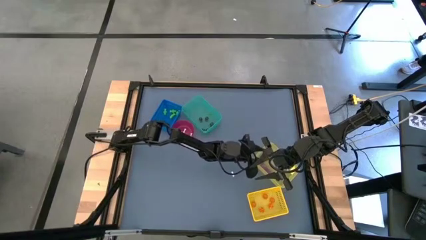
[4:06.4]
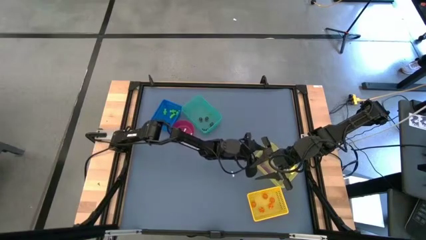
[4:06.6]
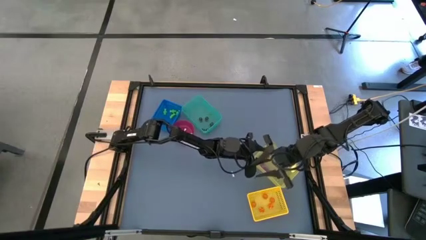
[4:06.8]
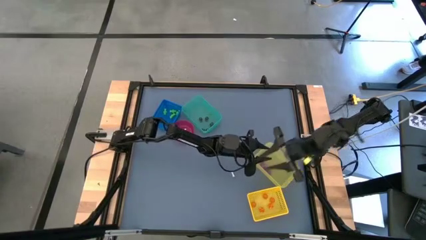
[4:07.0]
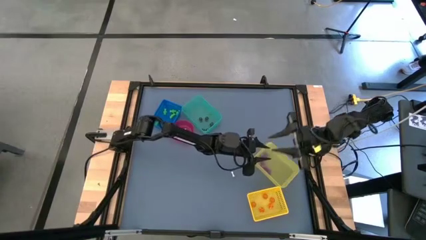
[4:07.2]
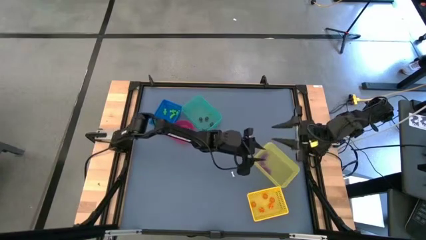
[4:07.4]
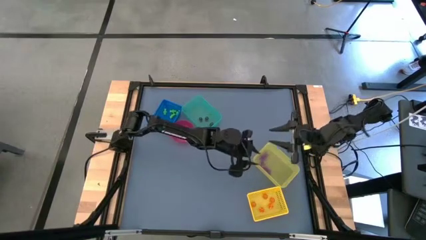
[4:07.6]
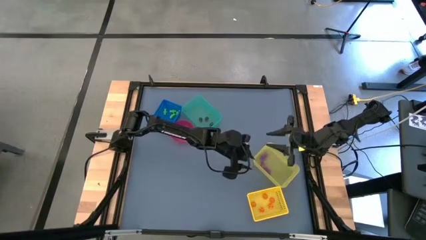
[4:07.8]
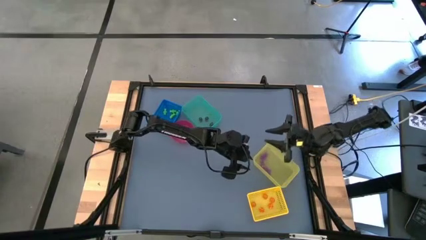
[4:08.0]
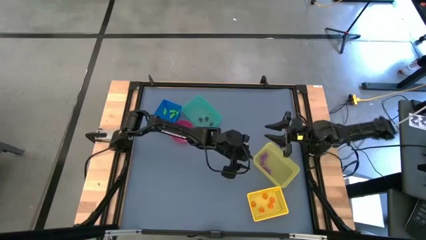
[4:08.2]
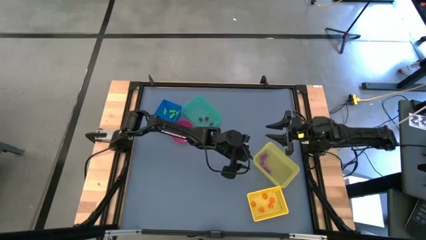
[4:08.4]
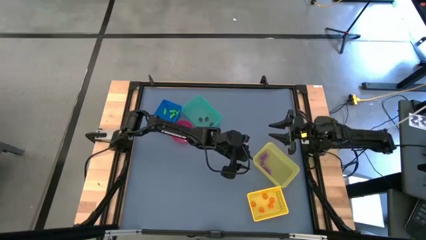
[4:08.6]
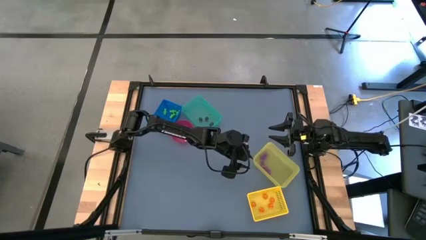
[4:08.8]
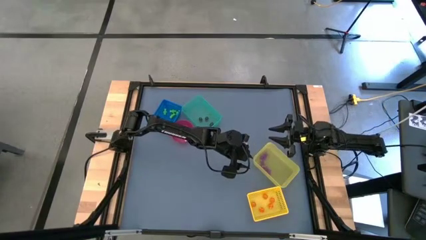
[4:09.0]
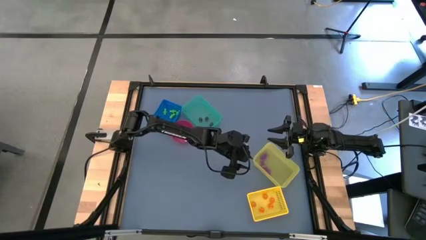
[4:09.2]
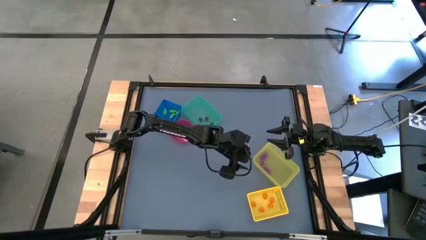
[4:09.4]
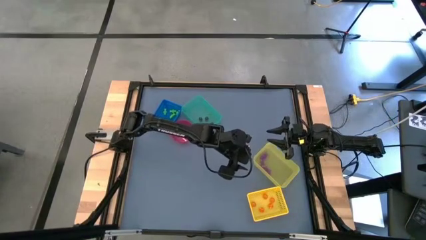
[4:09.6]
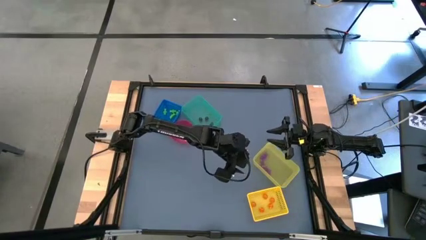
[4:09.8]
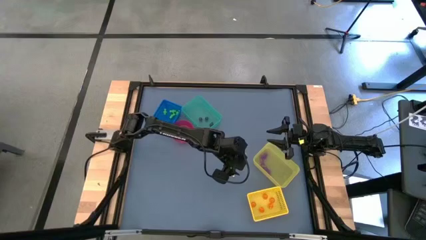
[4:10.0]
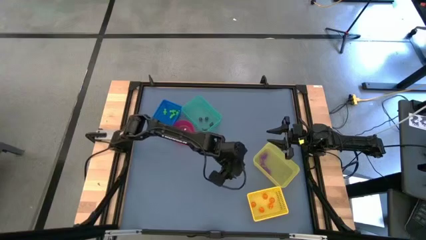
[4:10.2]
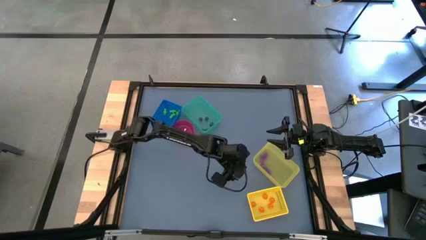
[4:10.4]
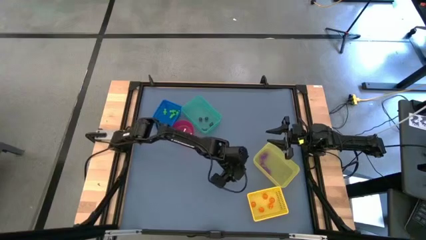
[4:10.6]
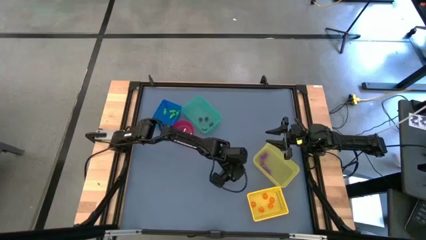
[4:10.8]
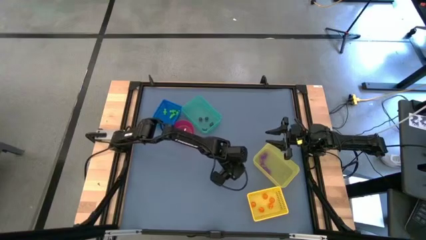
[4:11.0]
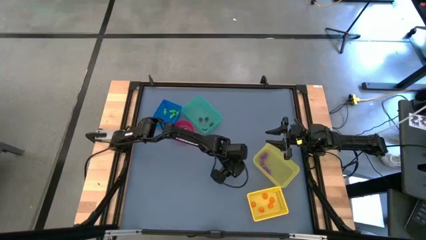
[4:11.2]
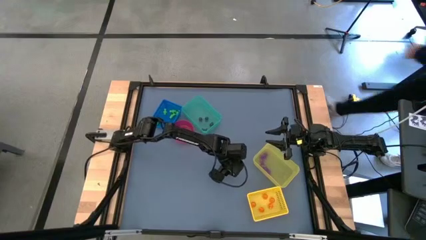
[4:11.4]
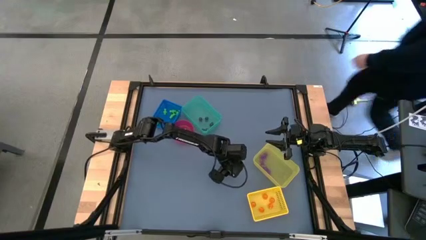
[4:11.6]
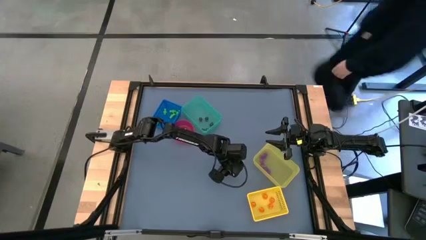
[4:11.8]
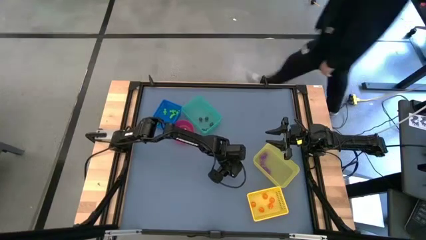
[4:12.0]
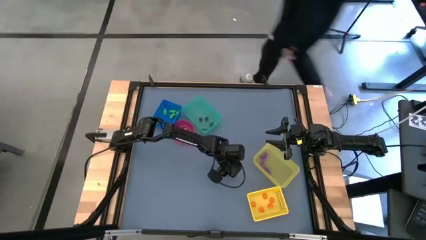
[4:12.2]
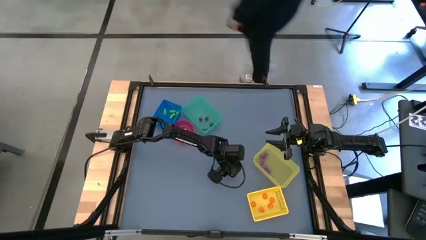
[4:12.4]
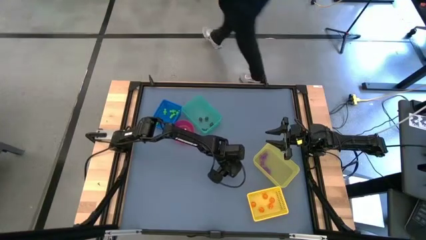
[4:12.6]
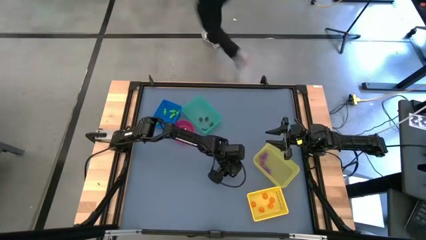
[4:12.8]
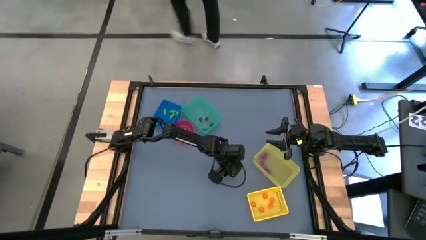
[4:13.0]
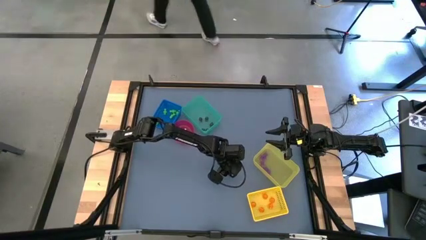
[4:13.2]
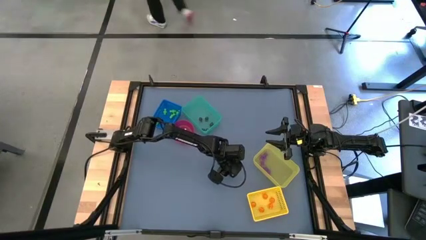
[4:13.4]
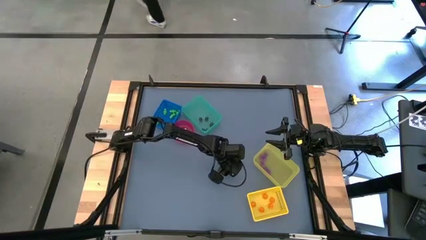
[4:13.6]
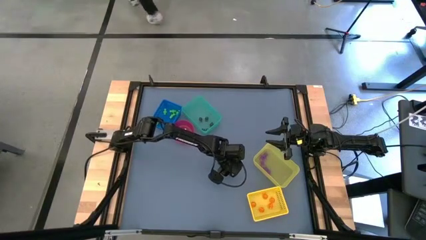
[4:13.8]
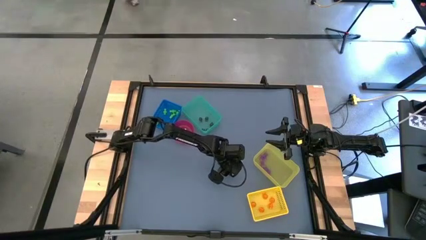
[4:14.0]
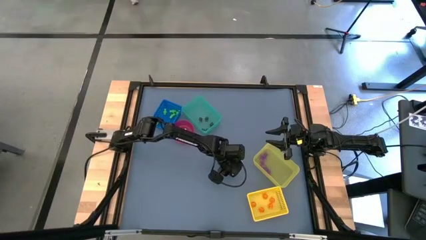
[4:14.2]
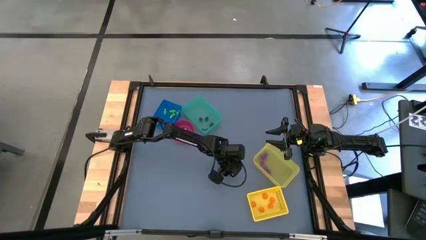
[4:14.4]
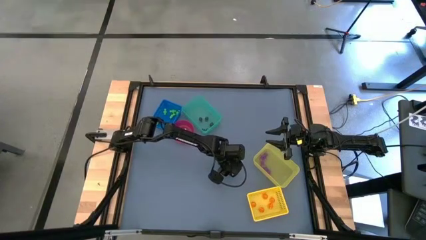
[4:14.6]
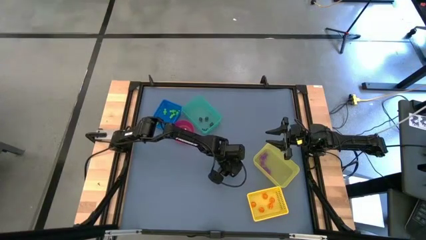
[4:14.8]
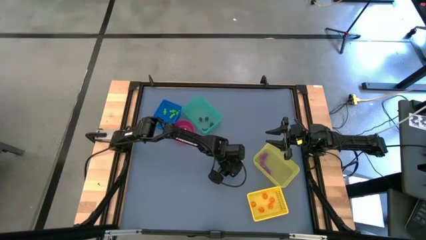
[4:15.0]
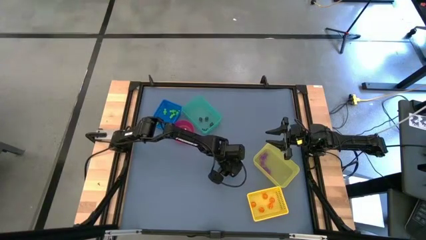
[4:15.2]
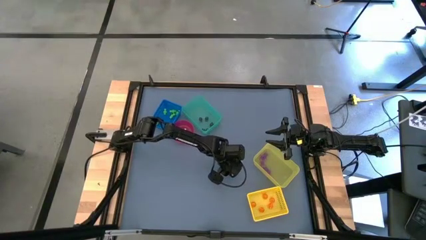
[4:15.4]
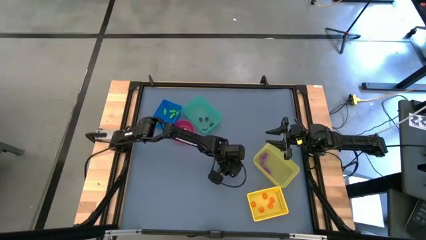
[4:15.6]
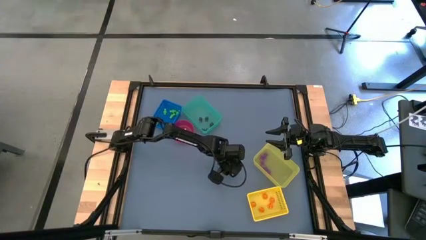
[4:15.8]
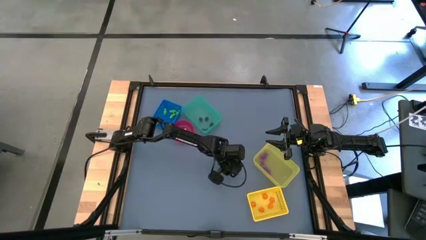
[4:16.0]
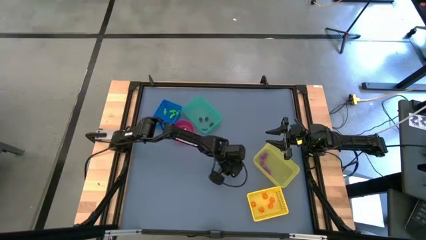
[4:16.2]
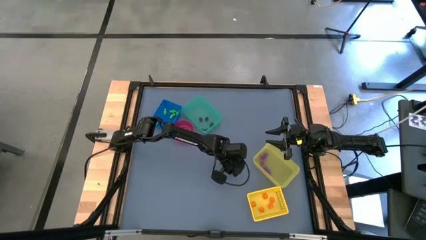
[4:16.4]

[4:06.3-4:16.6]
Task: Sort Halloween decoration
Put the white bone toy into the red bin

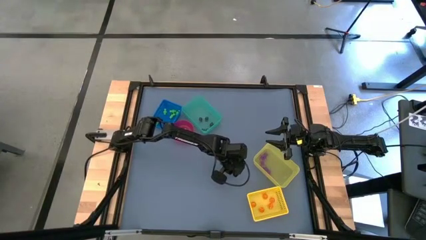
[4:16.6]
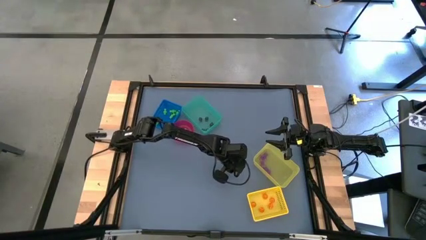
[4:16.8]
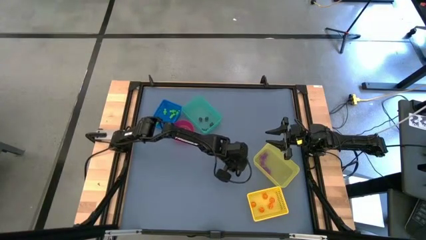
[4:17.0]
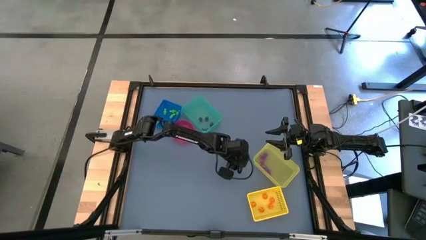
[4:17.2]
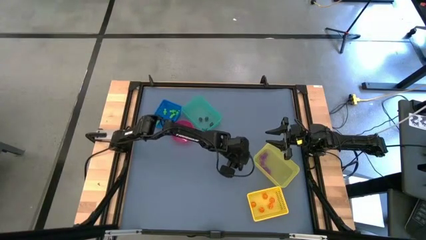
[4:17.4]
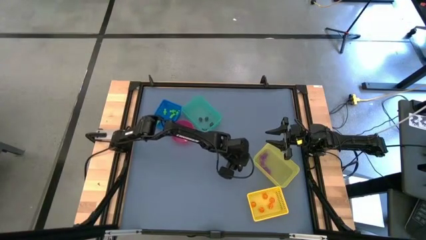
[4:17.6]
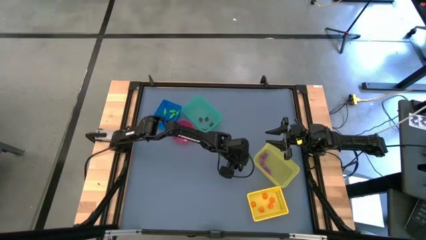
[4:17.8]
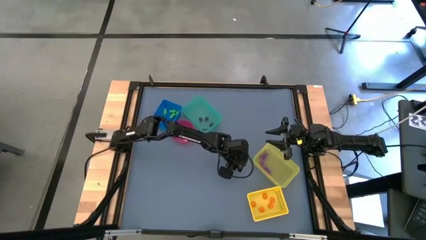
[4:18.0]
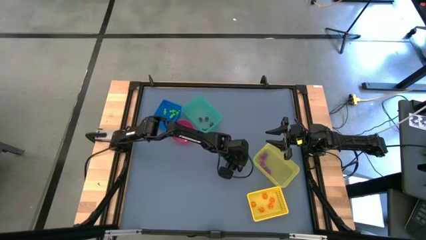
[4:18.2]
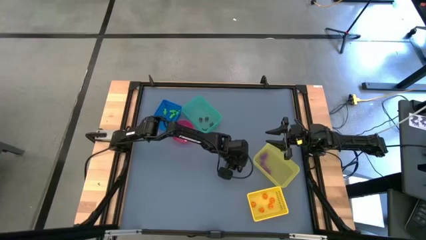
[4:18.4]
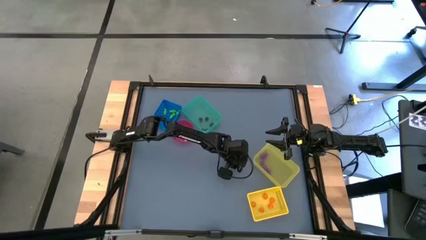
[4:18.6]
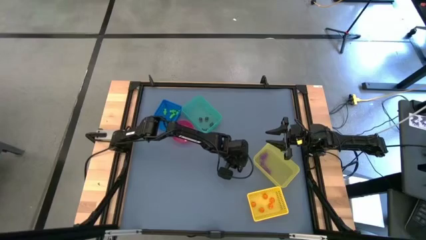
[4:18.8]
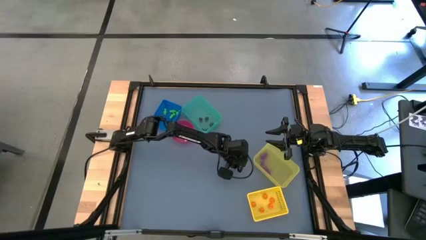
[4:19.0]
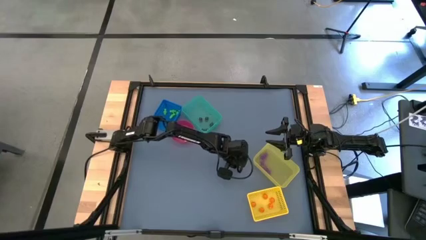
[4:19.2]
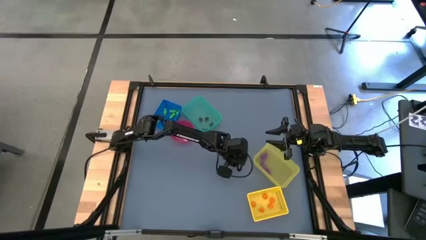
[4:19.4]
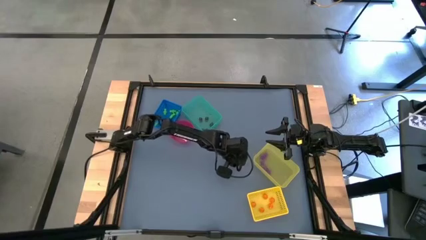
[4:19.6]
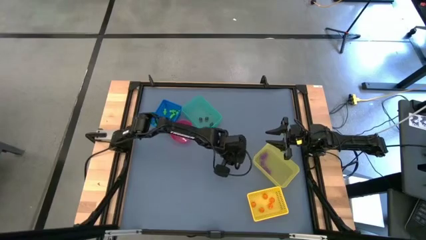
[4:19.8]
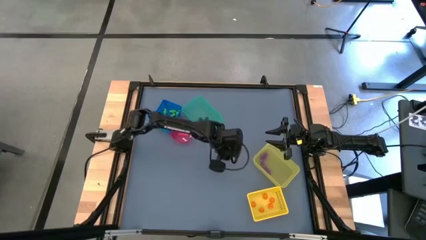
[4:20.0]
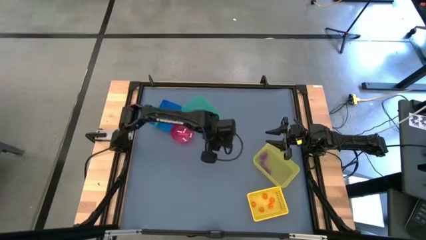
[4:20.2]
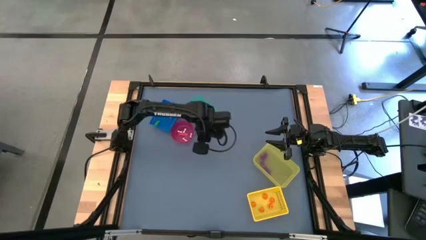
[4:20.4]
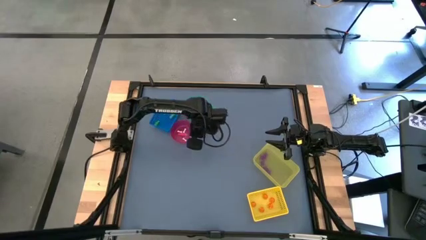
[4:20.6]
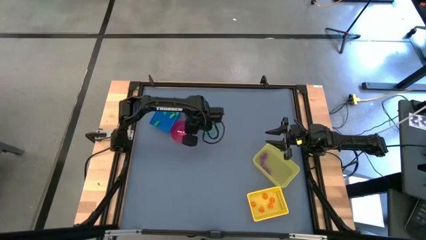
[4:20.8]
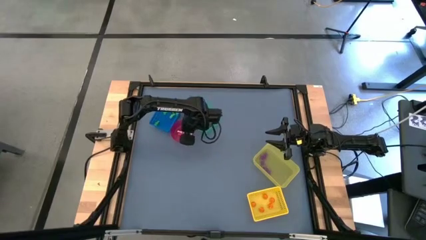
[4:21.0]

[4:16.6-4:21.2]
Put the white bone toy into the red bin

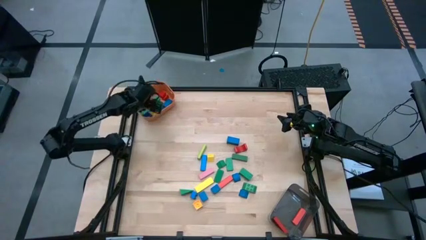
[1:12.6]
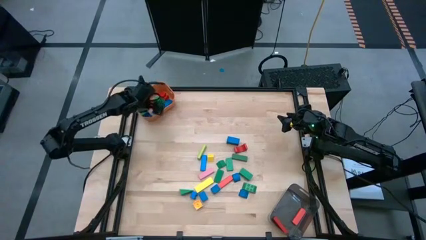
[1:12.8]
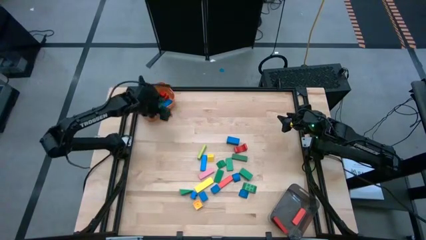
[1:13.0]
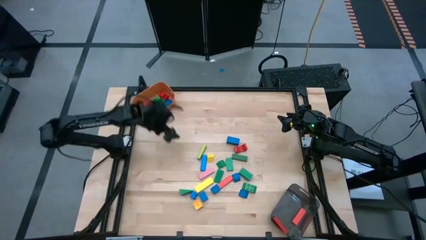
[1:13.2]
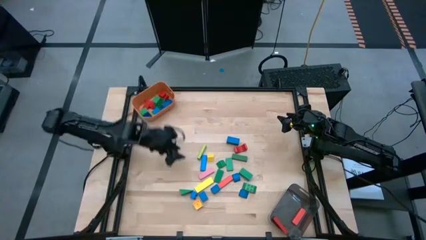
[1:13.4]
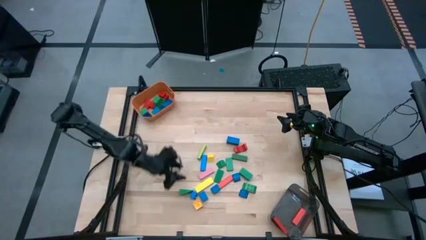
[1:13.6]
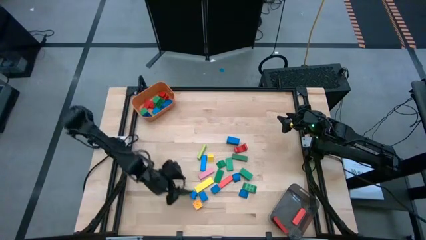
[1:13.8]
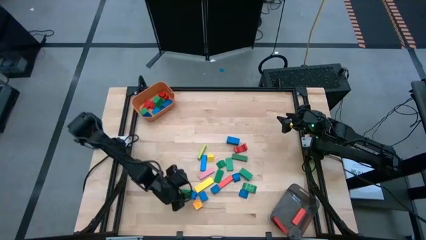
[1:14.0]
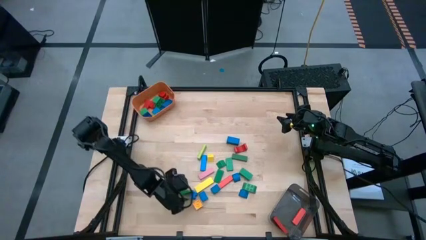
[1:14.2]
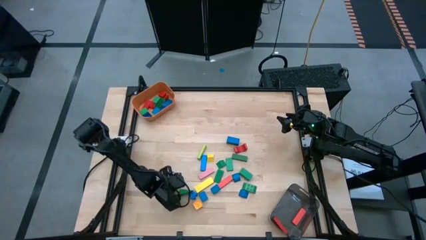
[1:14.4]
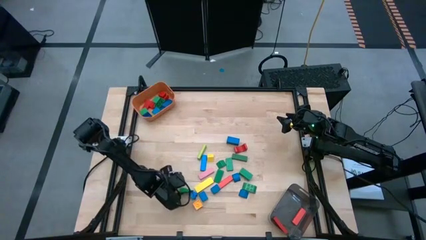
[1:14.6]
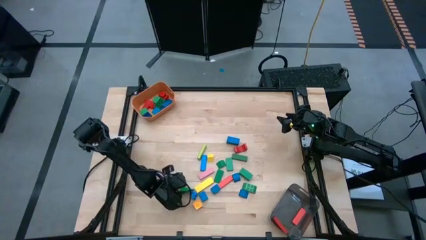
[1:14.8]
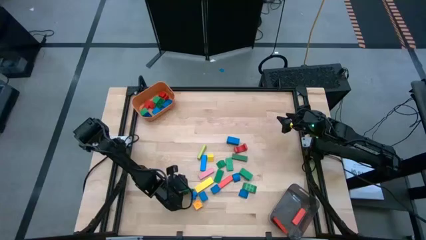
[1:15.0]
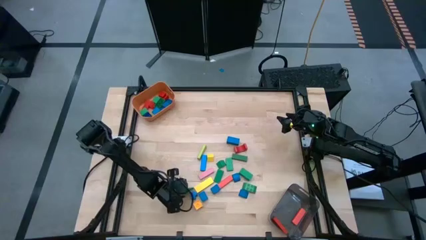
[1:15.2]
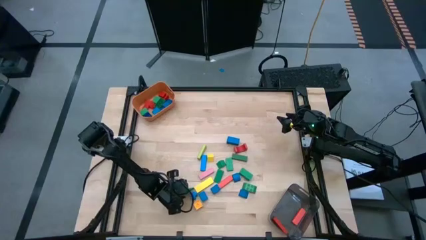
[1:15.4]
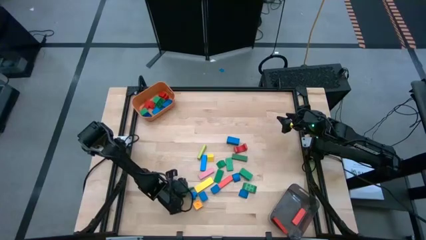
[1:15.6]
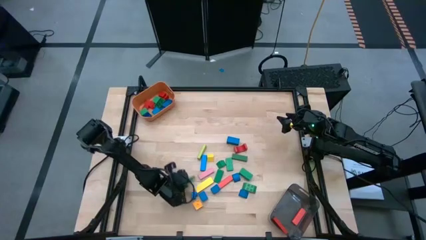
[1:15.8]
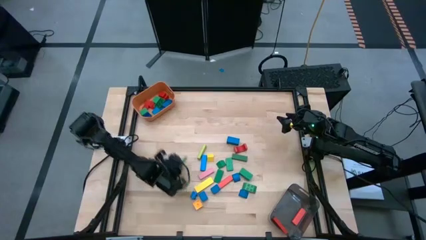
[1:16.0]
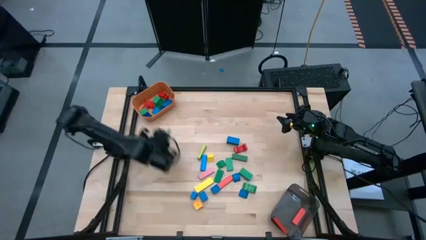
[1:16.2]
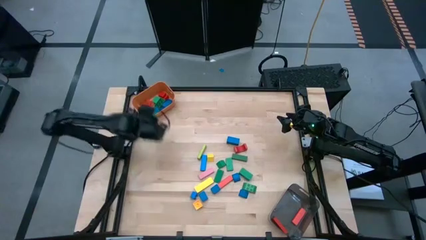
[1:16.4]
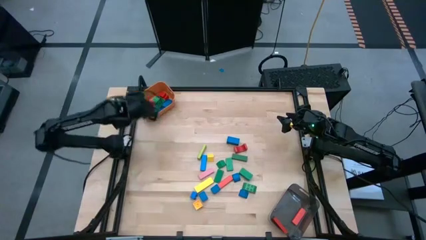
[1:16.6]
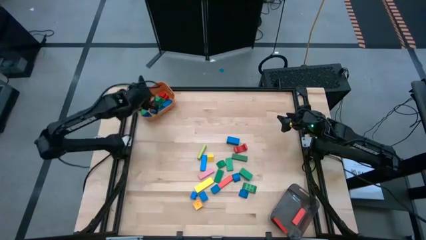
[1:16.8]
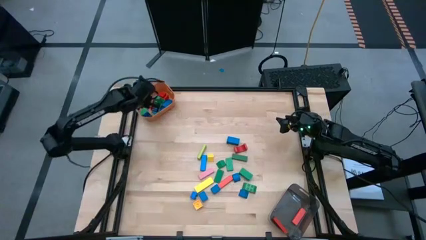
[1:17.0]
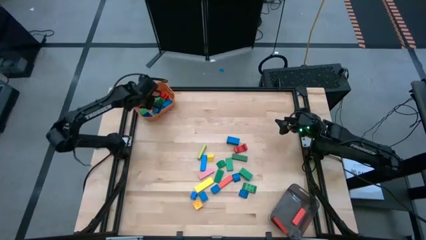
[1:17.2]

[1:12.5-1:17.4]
Task: Sort blocks by size
Put the small green block into the orange bin
